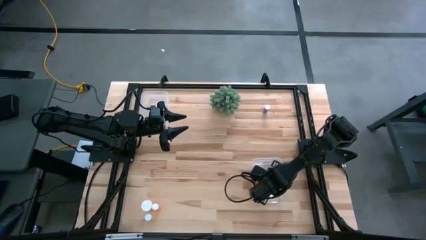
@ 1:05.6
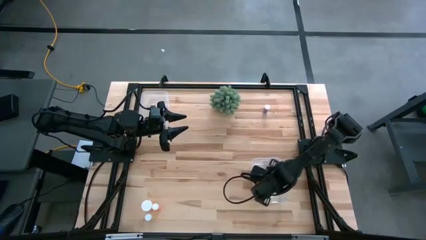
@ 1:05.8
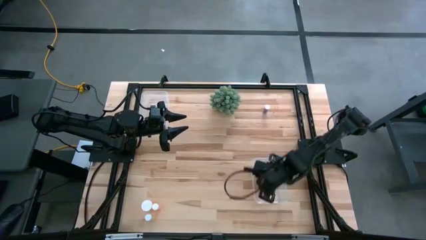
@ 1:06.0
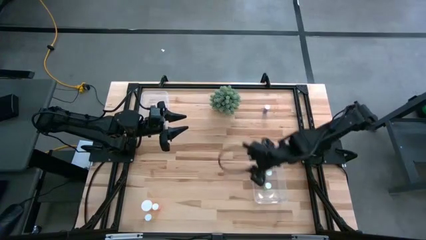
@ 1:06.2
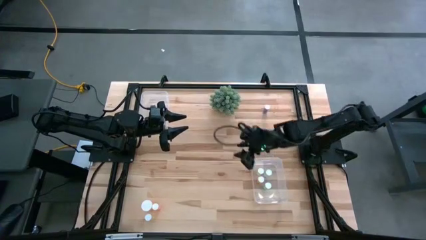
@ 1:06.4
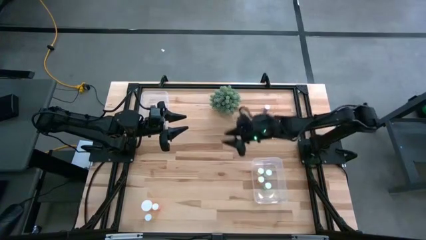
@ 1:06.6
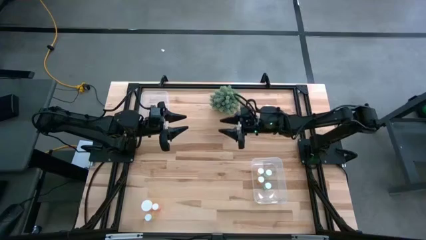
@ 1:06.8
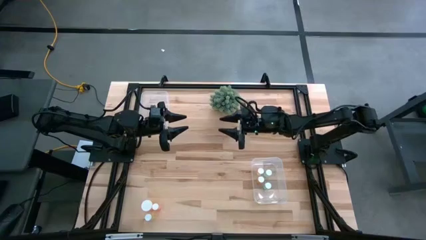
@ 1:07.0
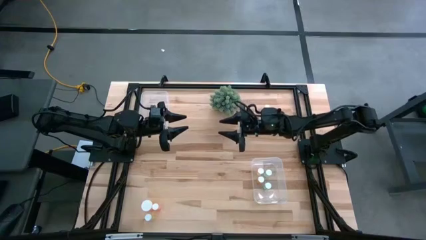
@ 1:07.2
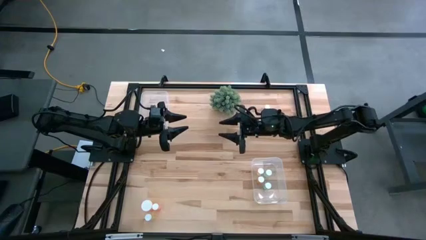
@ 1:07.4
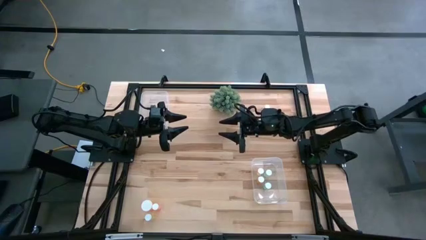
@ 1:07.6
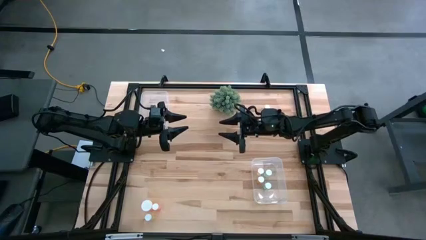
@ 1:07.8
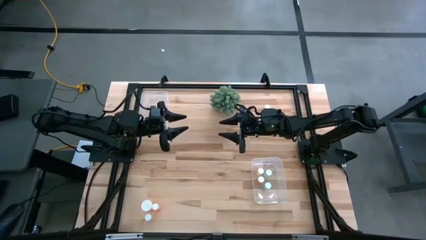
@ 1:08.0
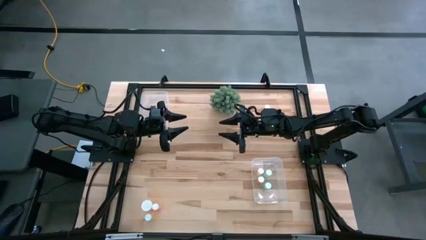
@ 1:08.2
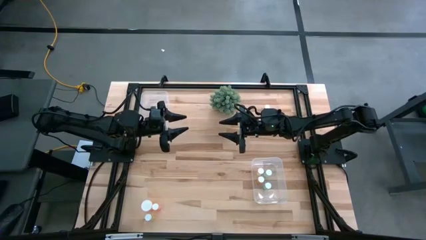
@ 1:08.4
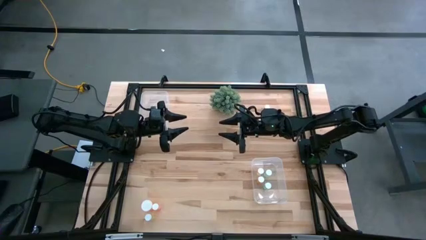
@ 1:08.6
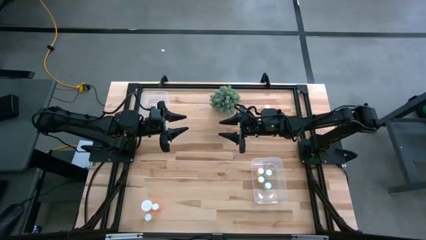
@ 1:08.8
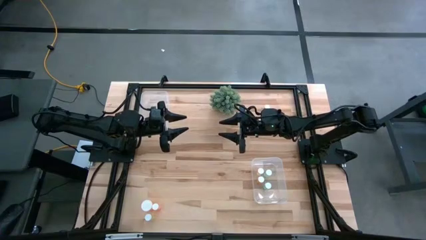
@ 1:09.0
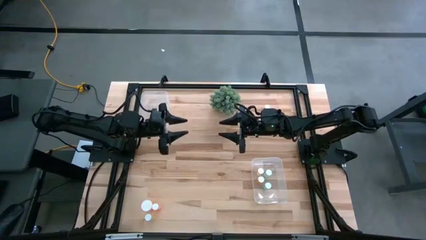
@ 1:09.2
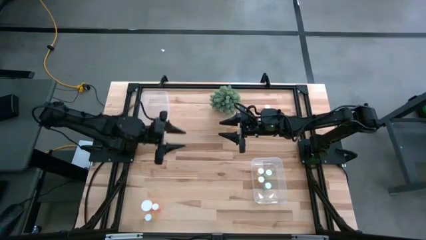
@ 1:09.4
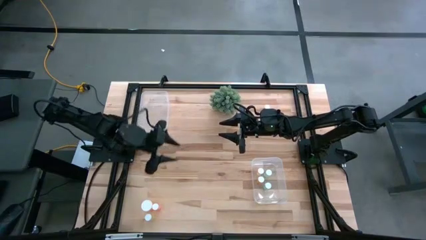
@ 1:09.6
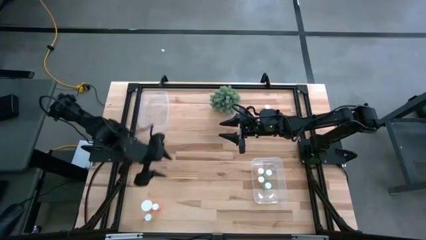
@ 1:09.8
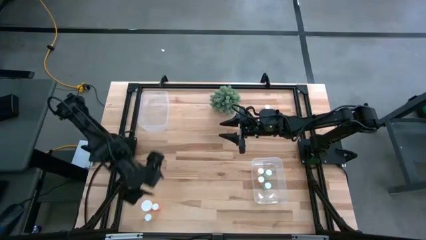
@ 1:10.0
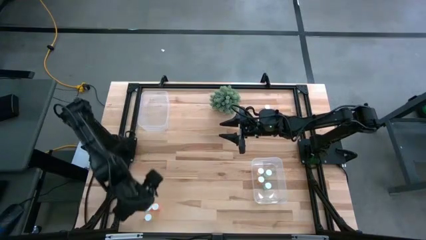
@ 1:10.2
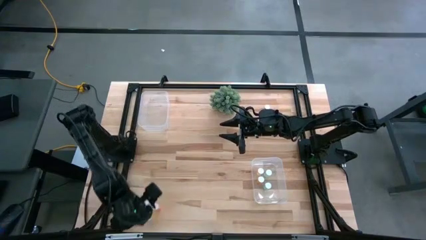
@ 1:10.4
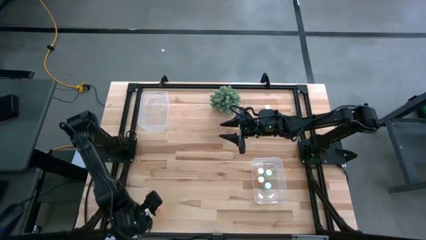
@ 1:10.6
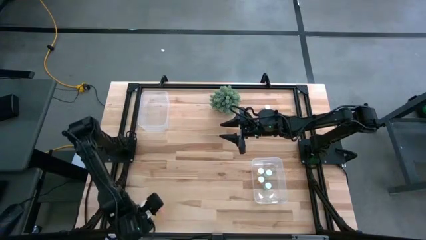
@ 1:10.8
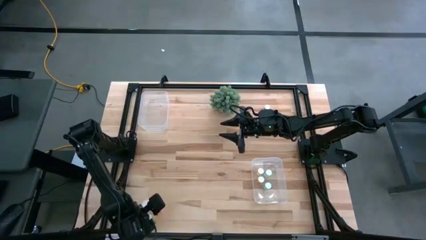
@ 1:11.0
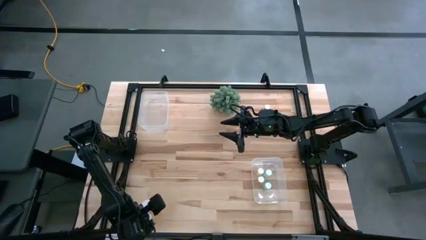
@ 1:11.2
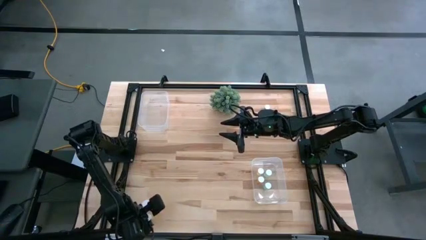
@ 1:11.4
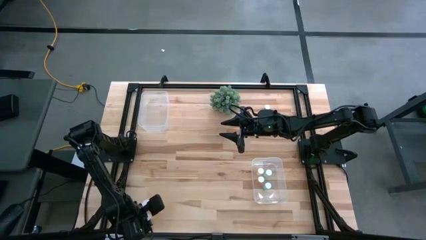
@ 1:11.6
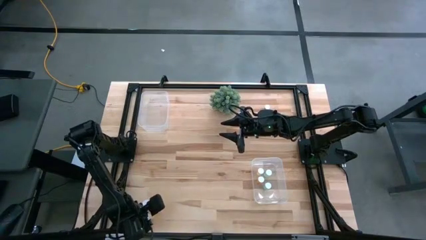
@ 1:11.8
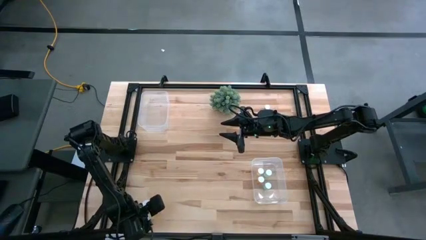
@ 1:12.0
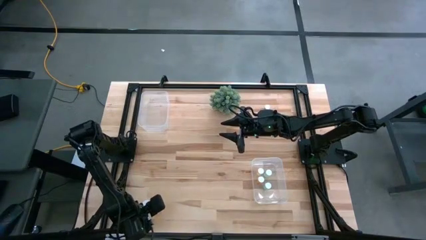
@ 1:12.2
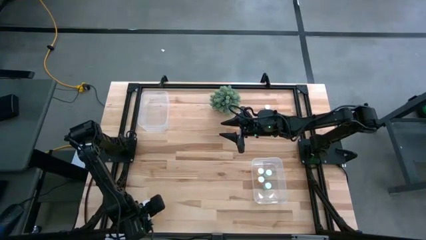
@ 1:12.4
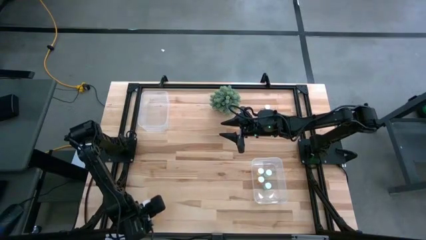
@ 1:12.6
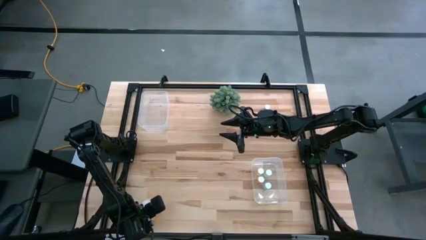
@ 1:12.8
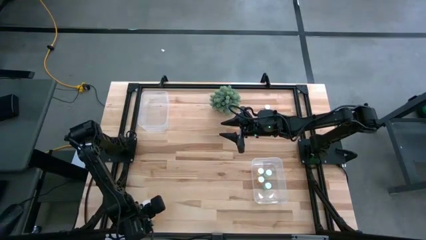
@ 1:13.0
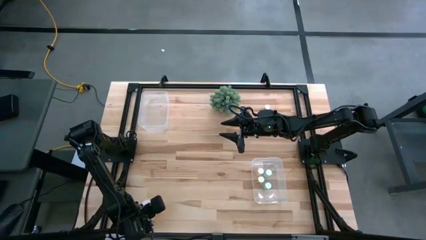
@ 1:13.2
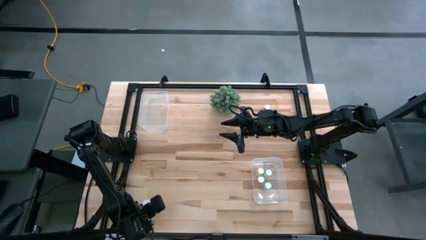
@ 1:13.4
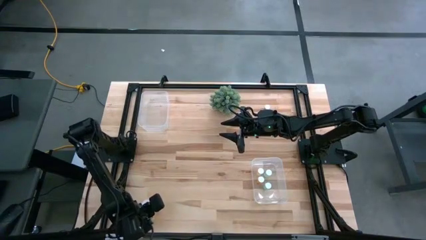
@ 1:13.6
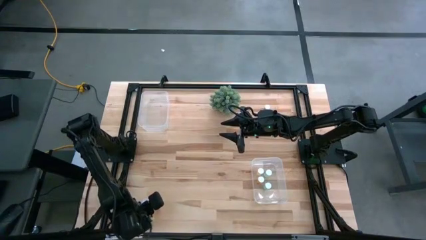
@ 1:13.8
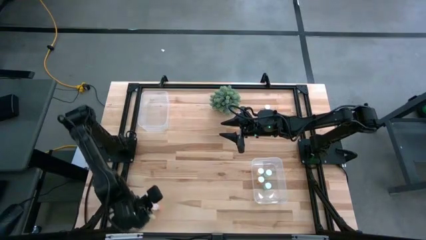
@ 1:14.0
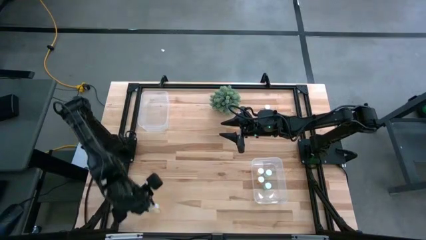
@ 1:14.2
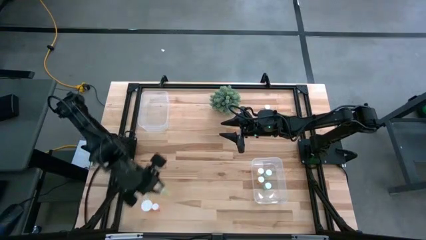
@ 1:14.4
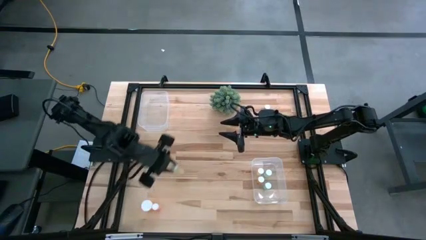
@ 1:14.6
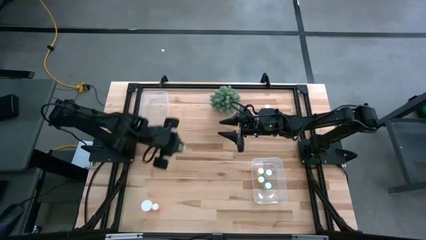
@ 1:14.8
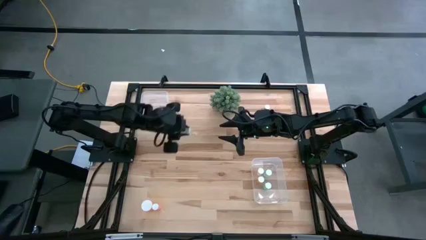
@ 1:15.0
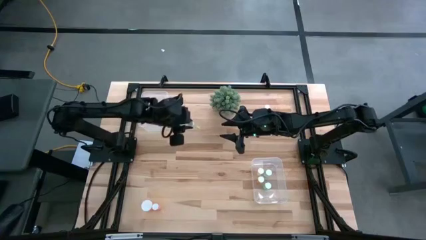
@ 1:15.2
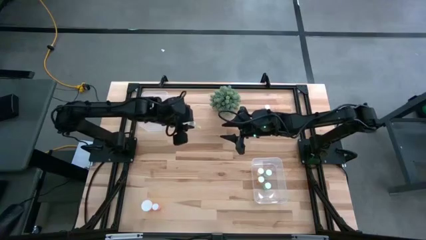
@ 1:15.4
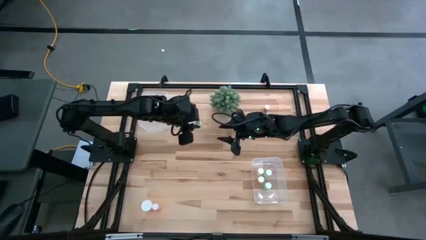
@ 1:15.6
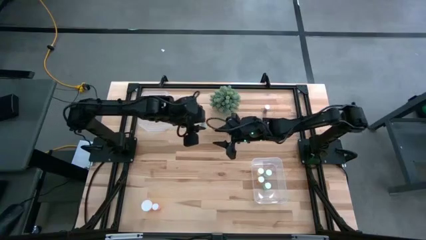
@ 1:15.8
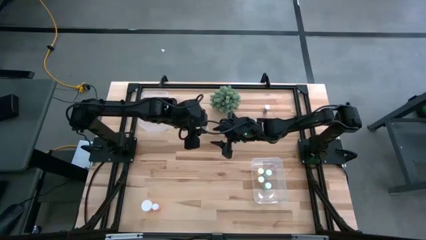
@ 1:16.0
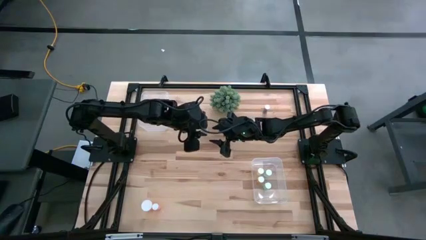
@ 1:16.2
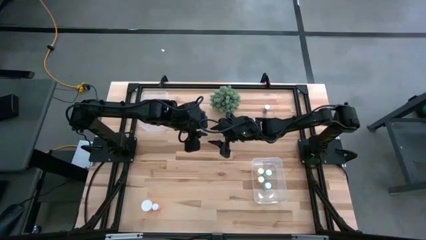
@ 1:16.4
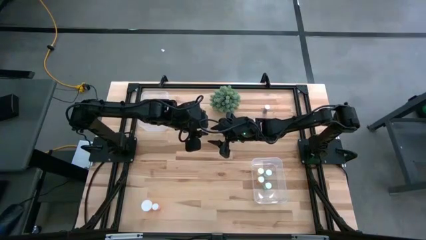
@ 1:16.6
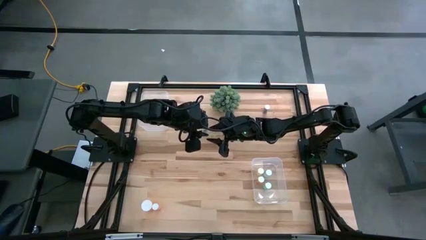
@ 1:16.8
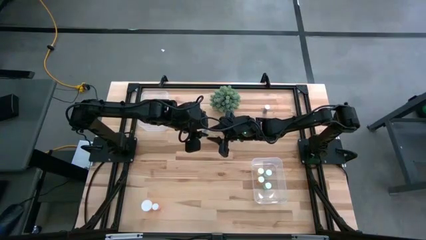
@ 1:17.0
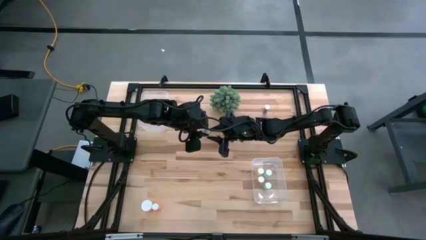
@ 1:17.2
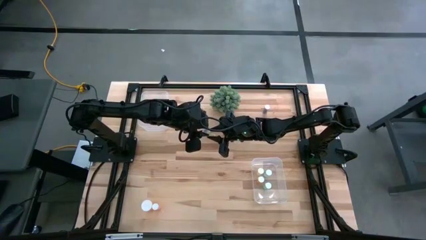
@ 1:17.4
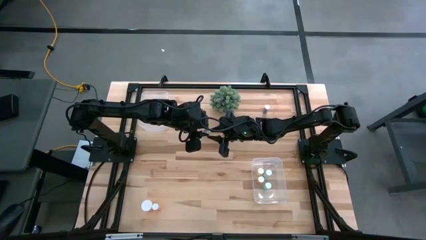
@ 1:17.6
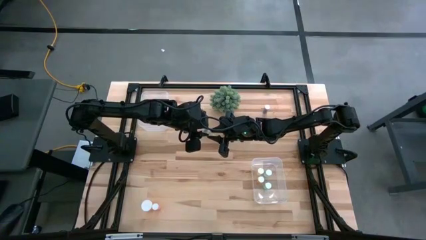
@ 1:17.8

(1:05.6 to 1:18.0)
Task: Pick and place medicine bottles into bin by pill shape (circle, oval)
Put the yellow tablet bottle into the right transparent bin

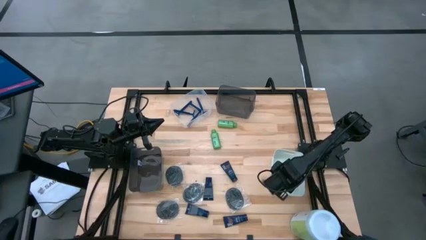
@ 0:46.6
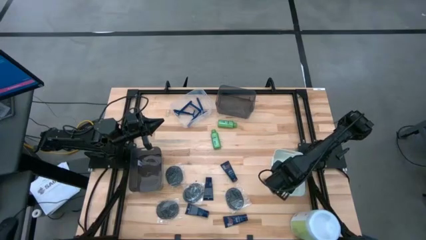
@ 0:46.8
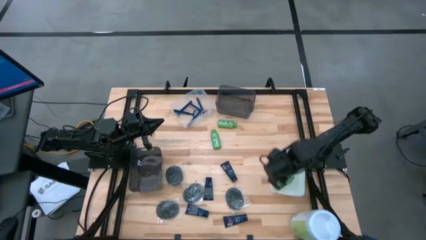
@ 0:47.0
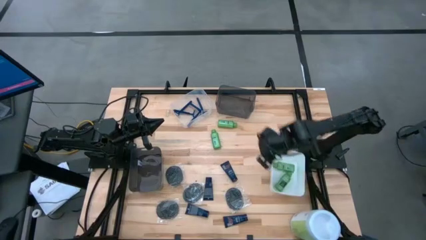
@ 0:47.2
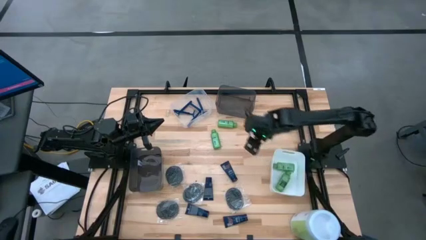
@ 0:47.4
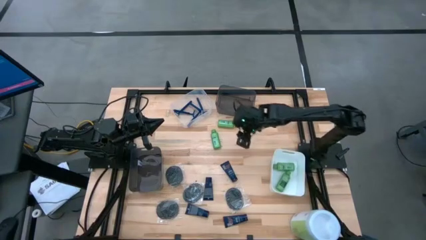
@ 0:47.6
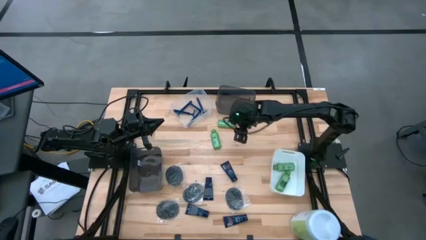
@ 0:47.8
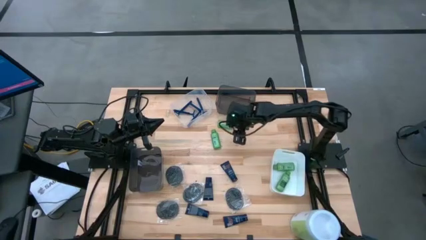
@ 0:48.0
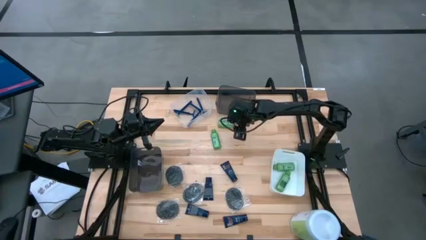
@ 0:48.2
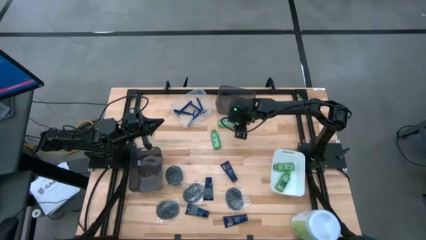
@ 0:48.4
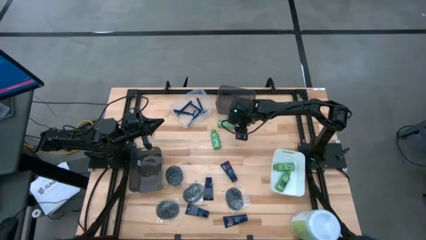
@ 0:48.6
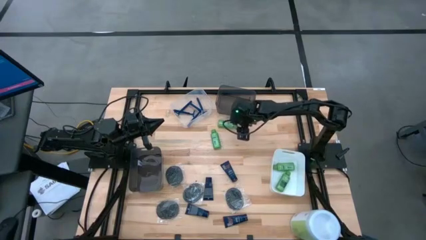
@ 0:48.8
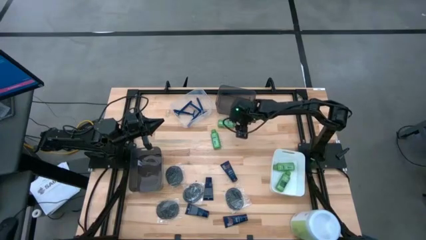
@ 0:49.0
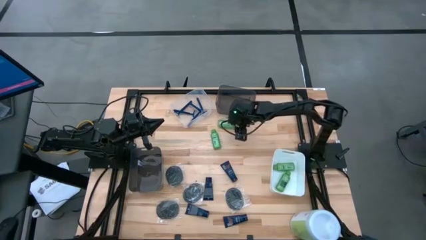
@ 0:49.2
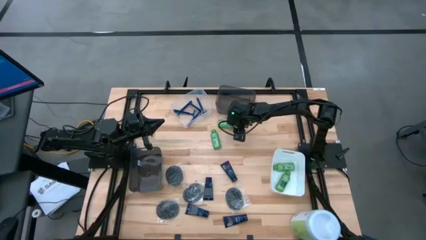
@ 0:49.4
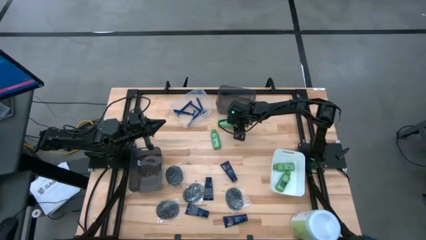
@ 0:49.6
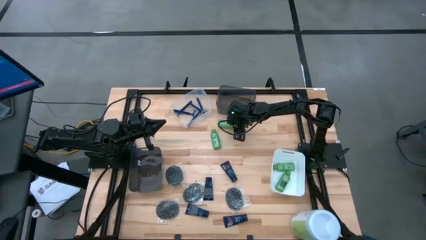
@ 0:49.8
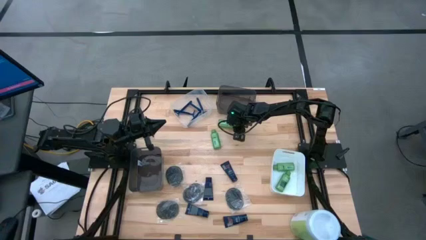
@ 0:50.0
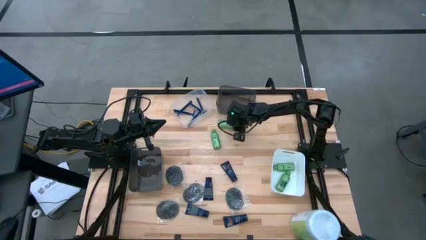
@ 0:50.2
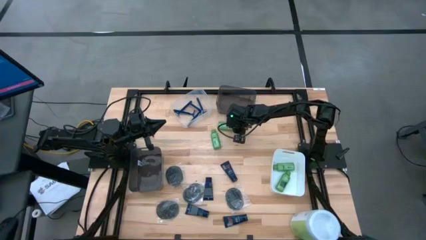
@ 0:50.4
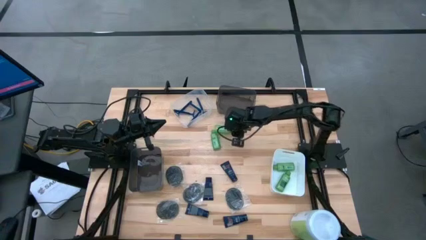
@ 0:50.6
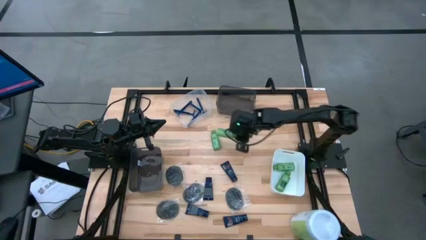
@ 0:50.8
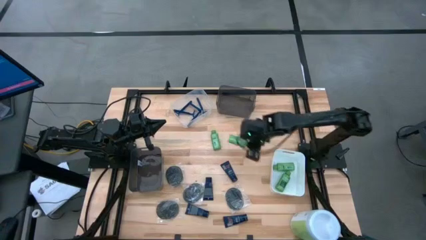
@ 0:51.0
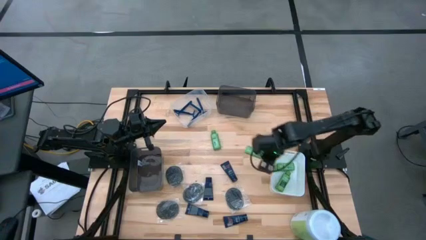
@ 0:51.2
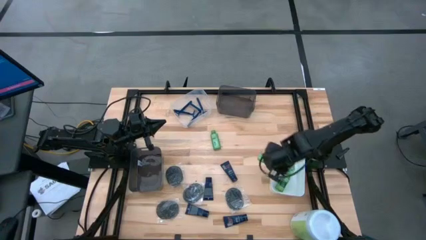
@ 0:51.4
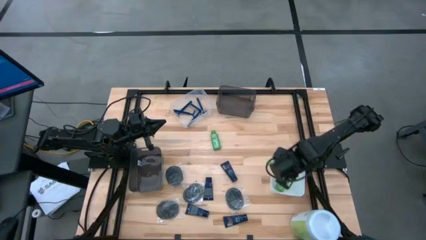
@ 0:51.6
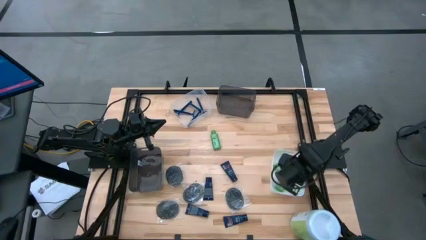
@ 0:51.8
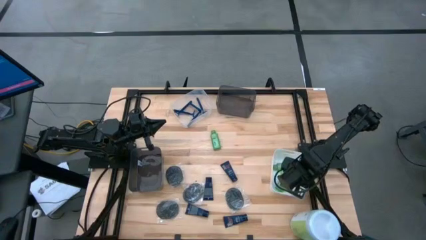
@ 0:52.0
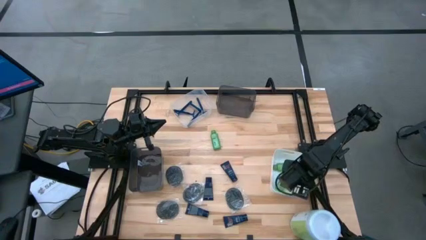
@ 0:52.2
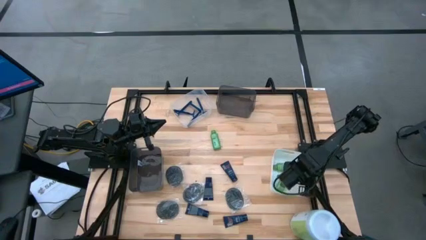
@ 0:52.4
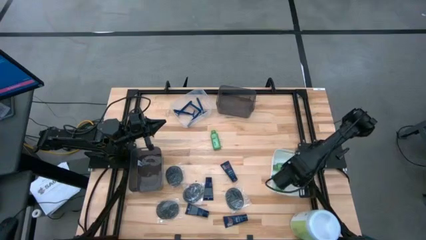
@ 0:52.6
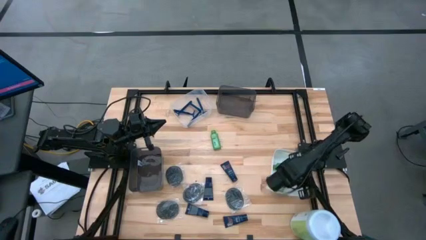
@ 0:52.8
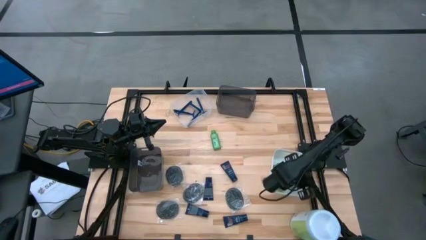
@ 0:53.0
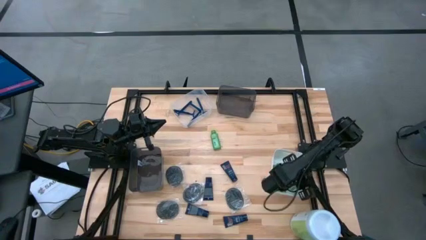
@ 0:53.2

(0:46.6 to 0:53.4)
Task: Pick & Place Travel size toiletries
Put the green shampoo into the white bin
